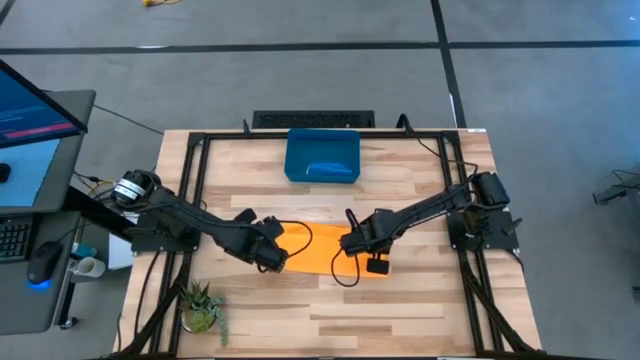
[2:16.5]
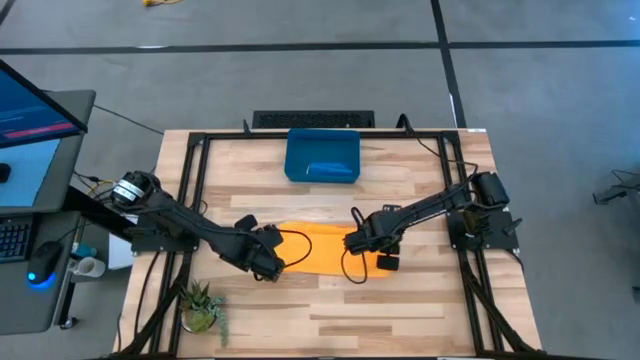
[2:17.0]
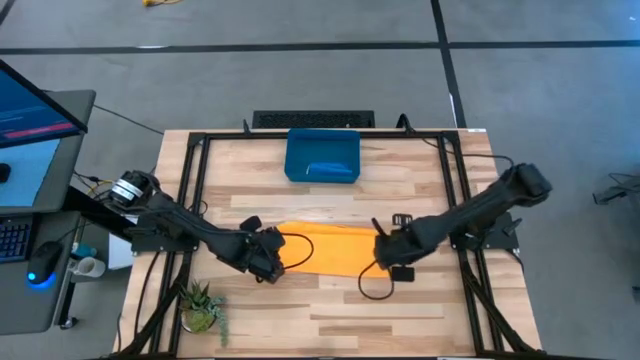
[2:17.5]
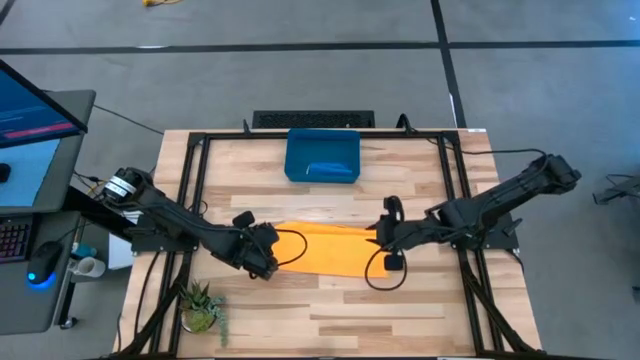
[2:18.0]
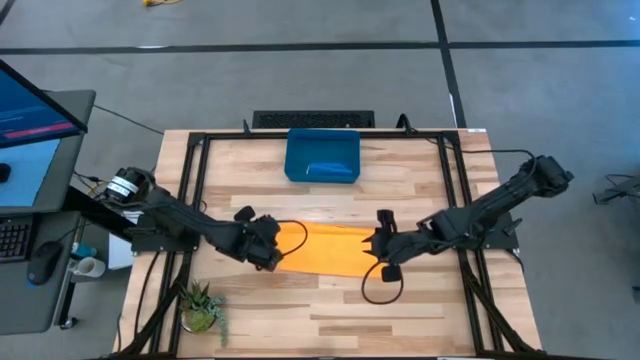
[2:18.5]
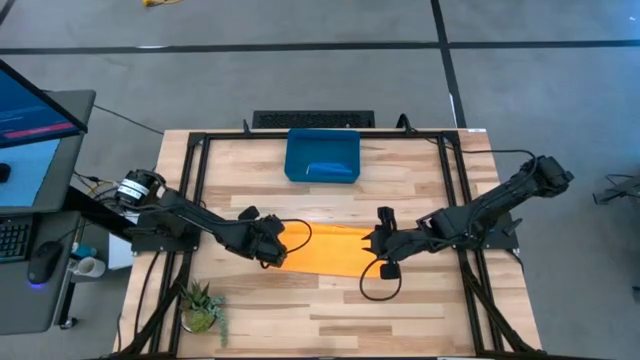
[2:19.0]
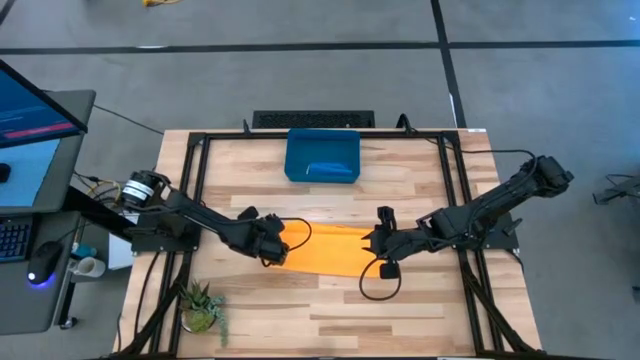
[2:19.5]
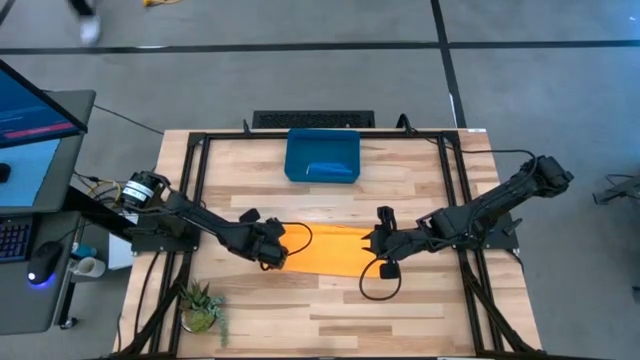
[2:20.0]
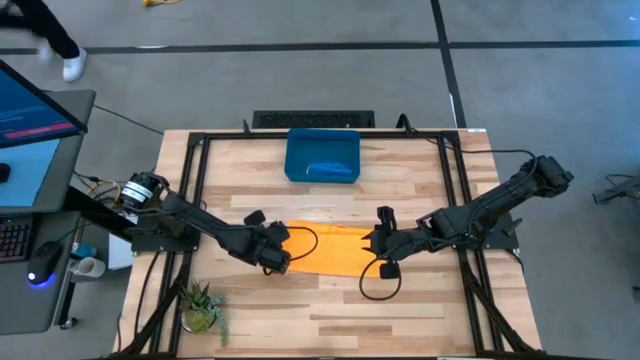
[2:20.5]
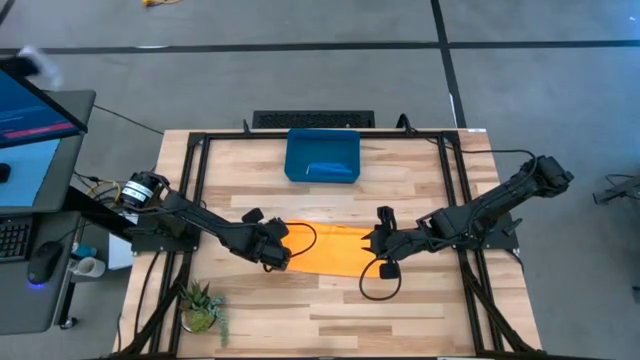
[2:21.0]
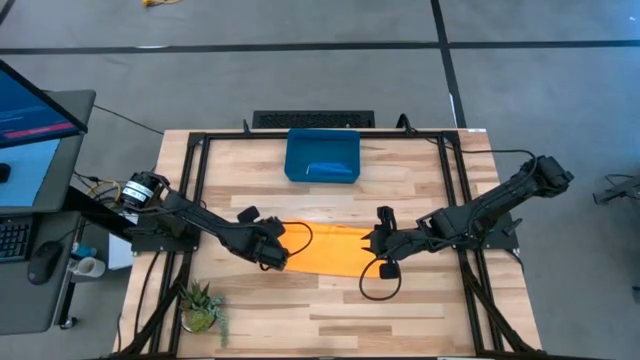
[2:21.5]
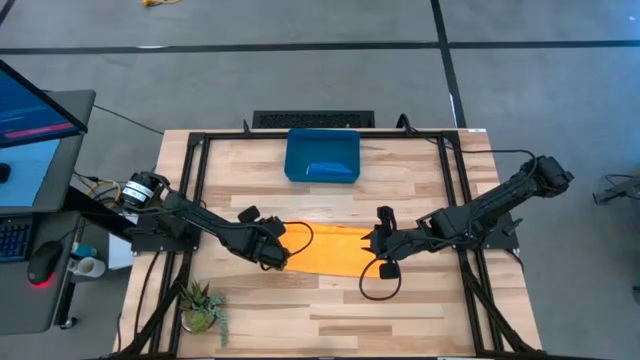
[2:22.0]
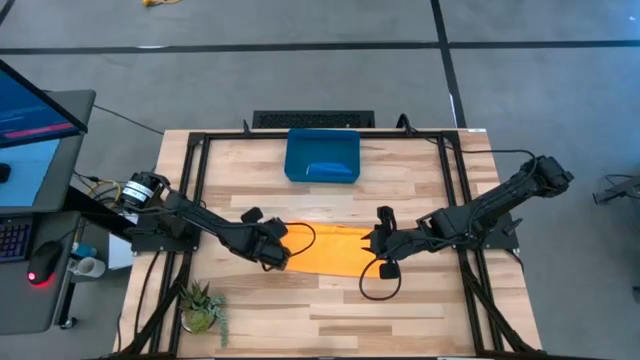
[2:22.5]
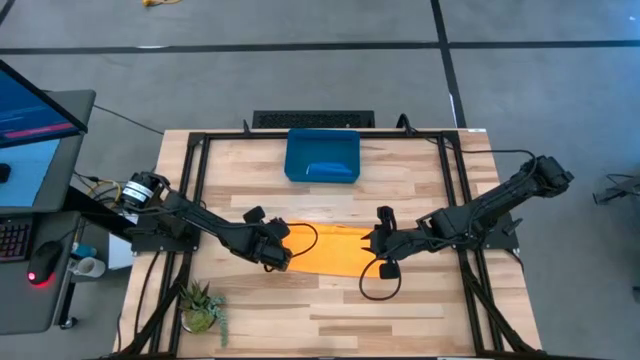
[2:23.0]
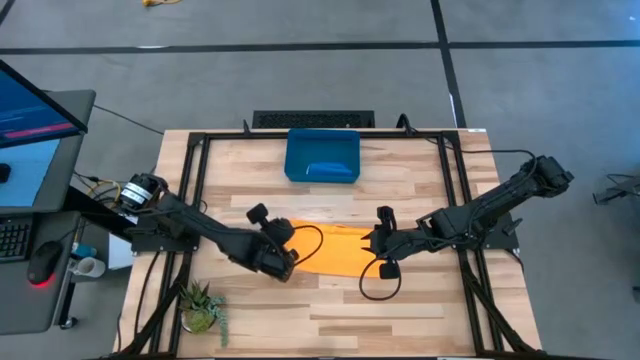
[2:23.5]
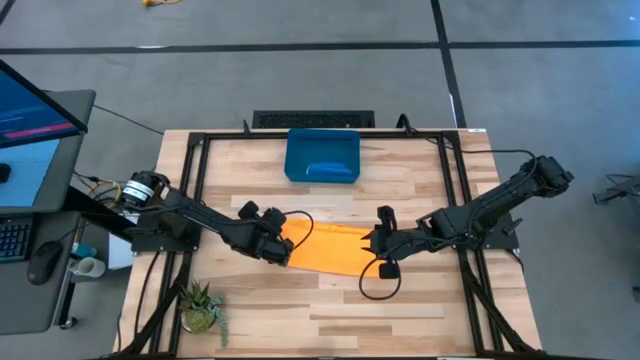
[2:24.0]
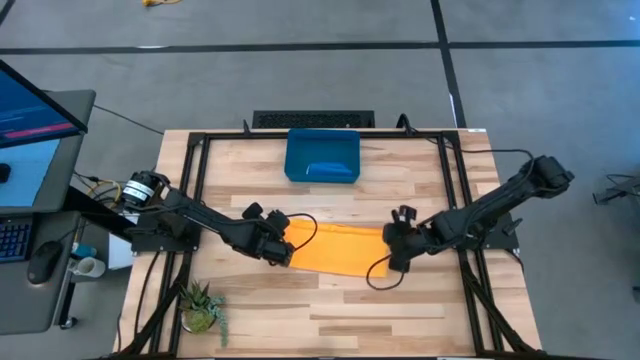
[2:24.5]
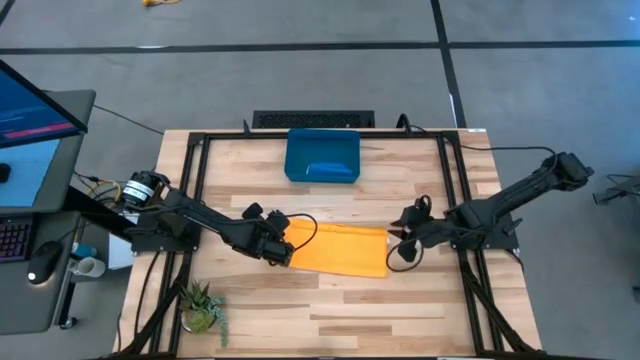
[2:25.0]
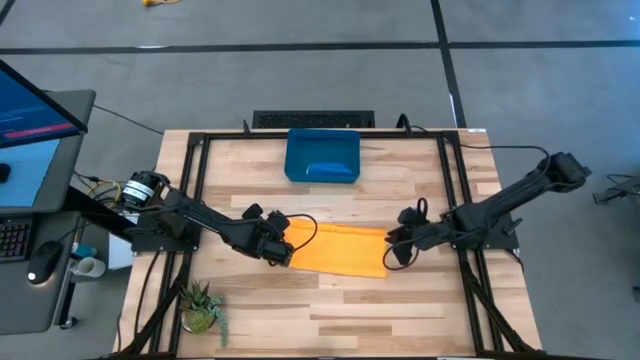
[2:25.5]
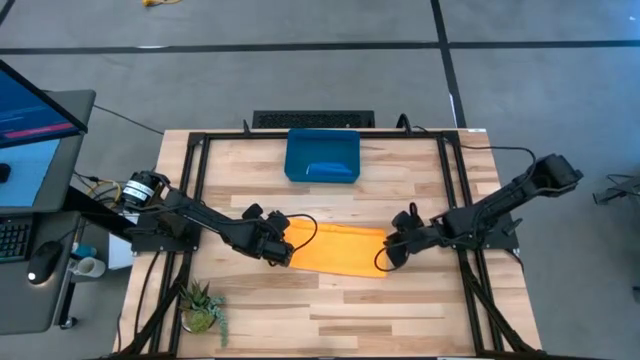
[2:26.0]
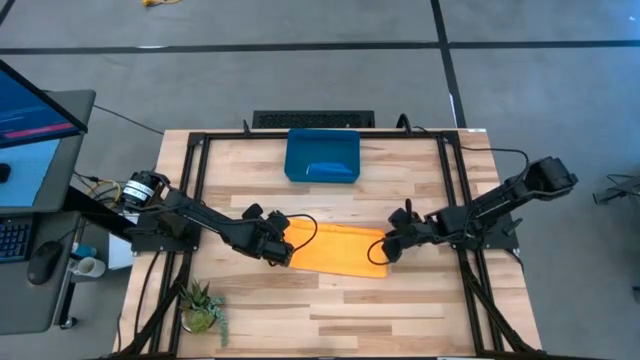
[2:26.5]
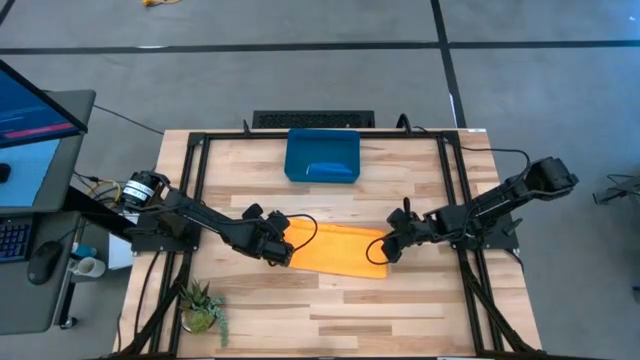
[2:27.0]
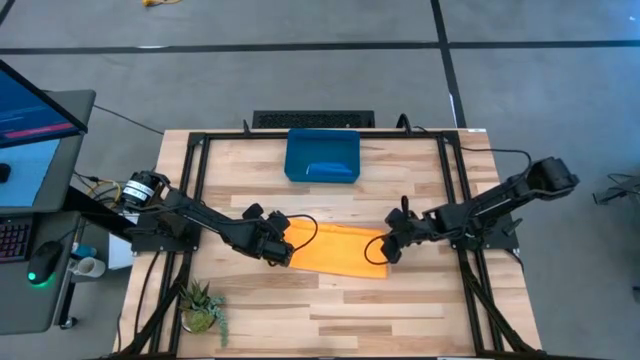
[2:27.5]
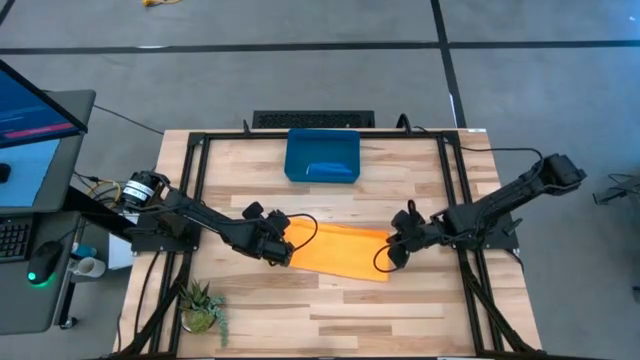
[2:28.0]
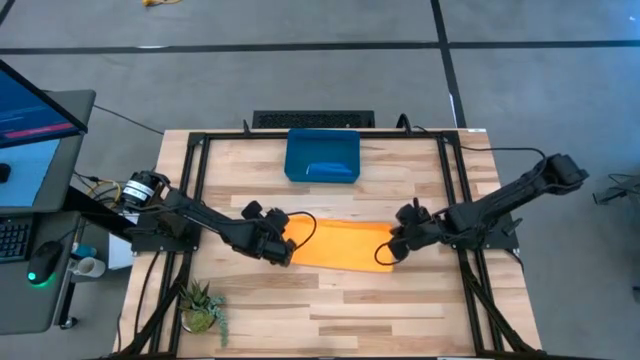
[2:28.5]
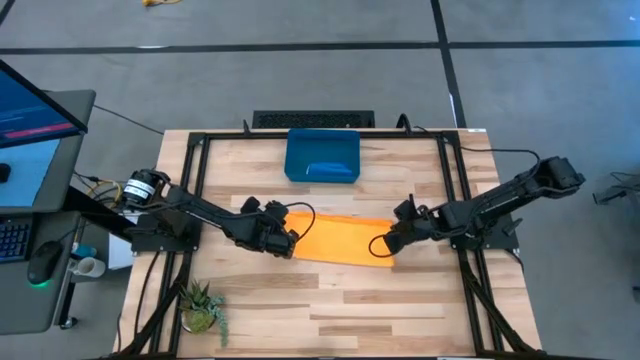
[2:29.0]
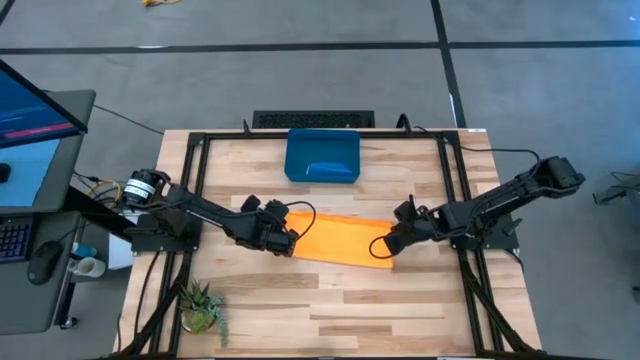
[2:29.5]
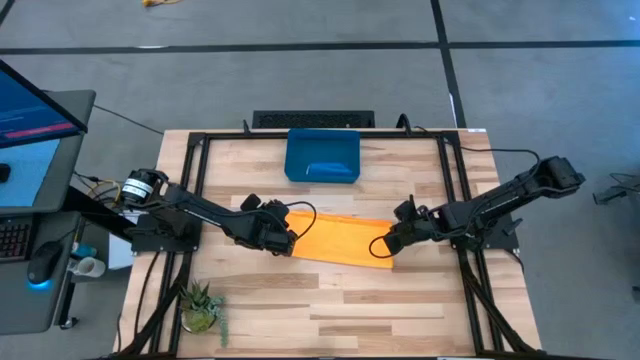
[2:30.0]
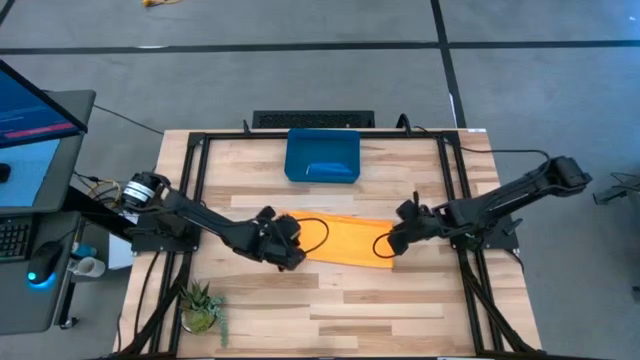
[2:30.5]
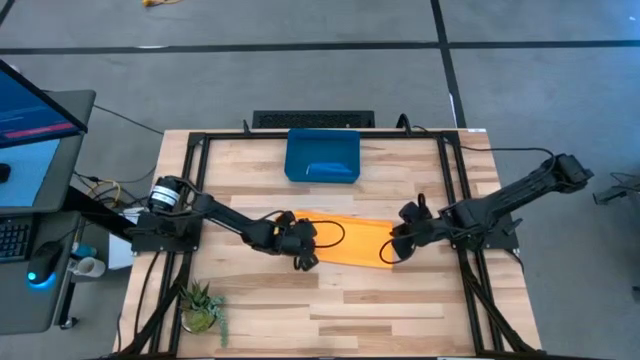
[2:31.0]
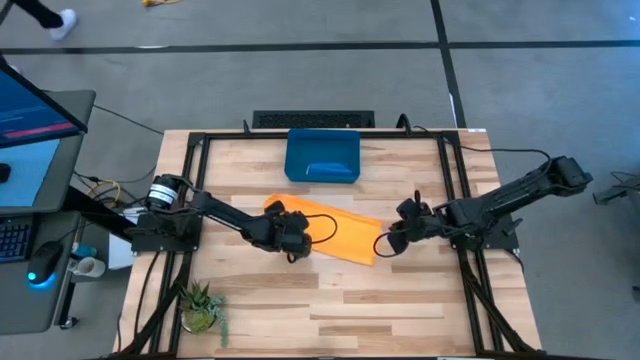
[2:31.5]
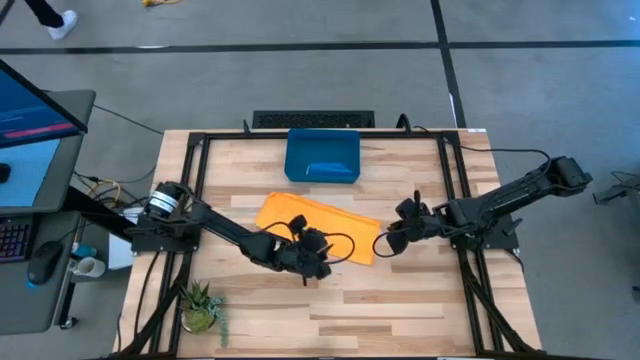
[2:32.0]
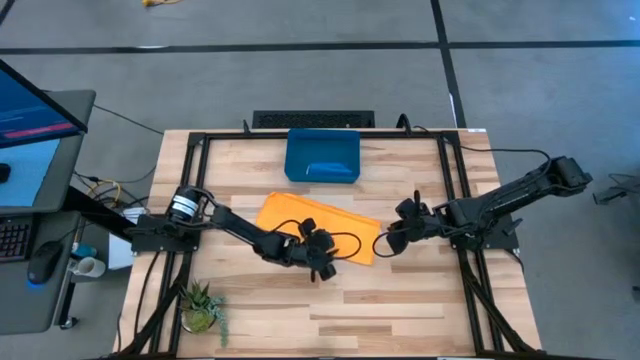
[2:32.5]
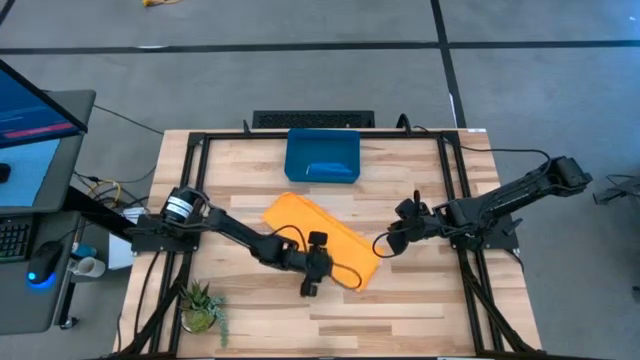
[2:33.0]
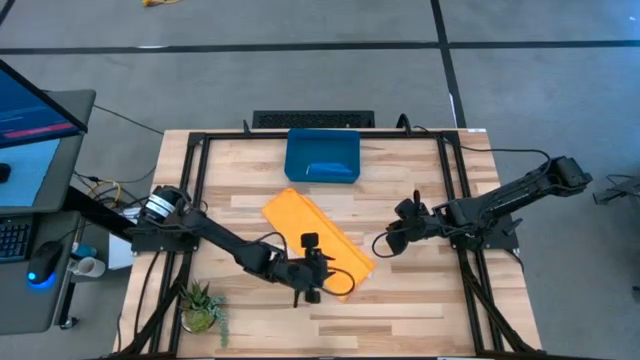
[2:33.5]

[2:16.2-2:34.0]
Task: Roll microfiber towels into tight, uniform cylinder then place into a basket
Fold the orange microfiber towel
